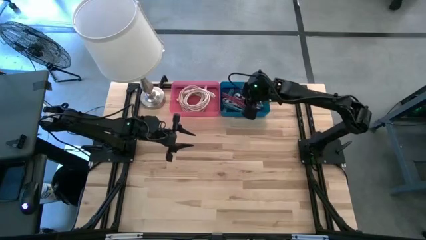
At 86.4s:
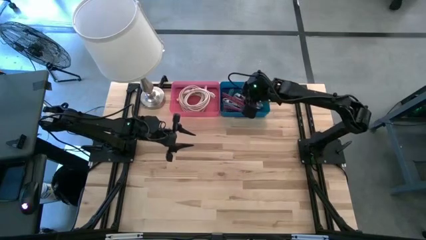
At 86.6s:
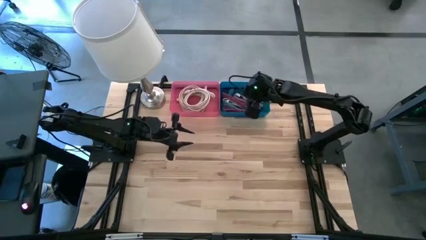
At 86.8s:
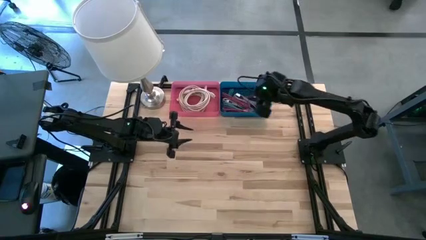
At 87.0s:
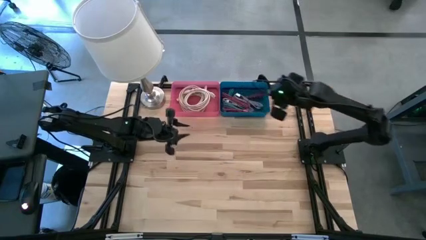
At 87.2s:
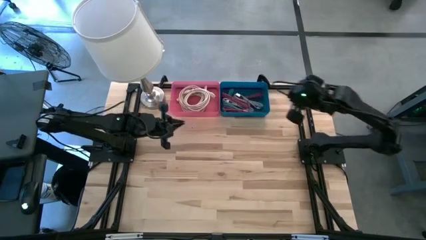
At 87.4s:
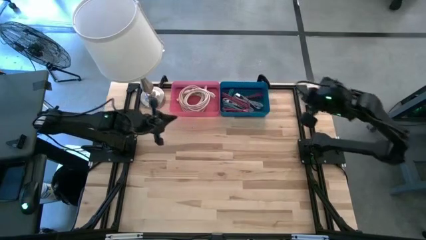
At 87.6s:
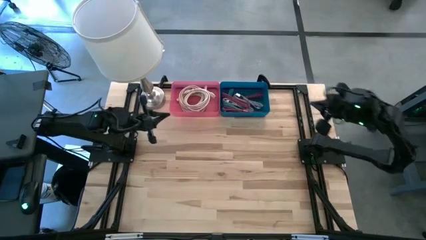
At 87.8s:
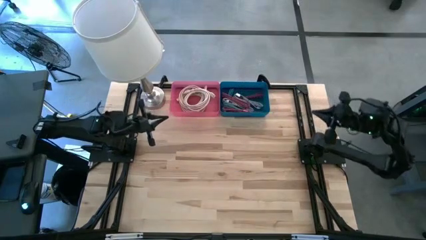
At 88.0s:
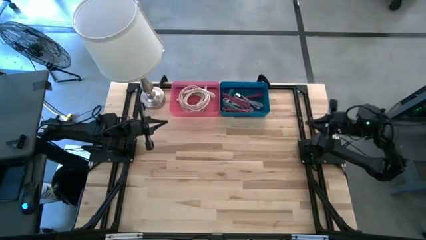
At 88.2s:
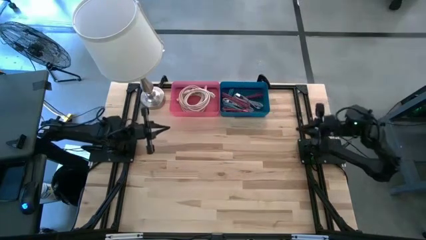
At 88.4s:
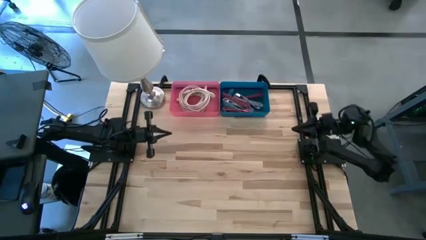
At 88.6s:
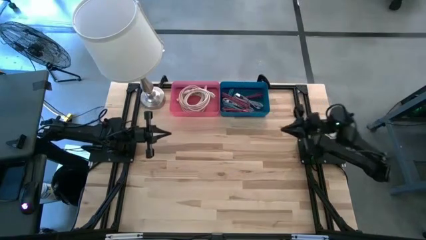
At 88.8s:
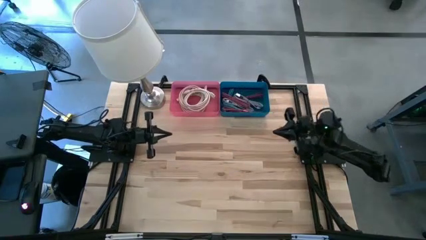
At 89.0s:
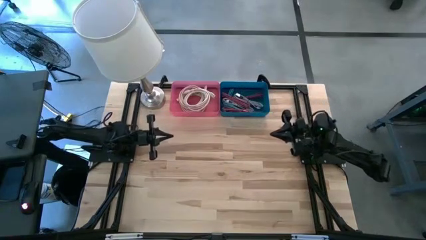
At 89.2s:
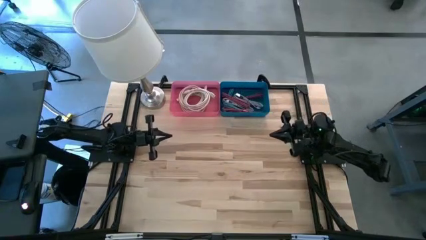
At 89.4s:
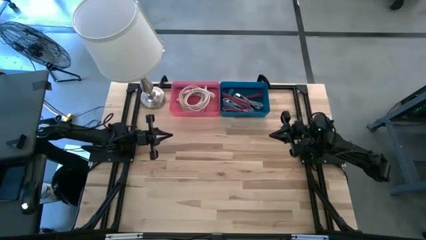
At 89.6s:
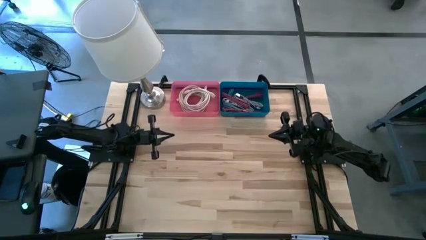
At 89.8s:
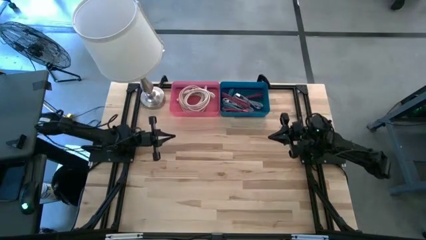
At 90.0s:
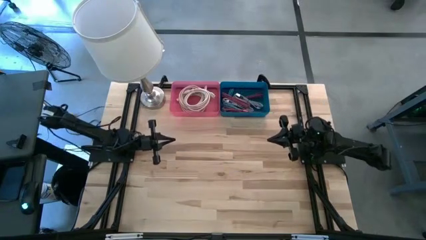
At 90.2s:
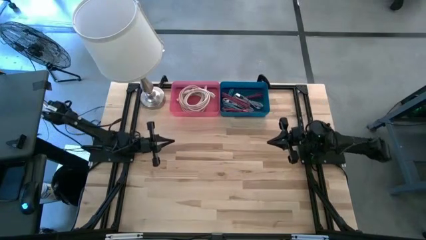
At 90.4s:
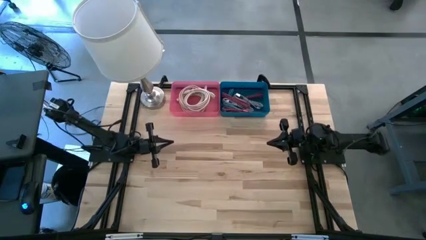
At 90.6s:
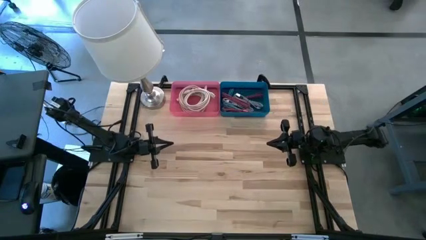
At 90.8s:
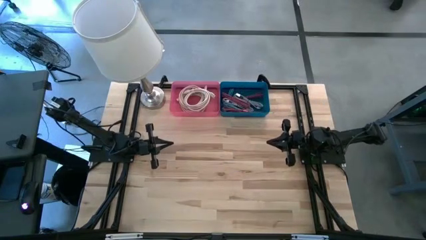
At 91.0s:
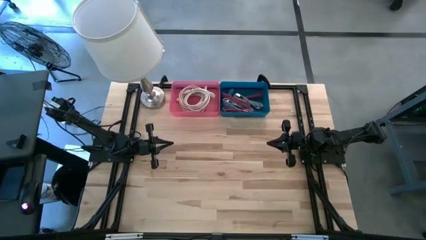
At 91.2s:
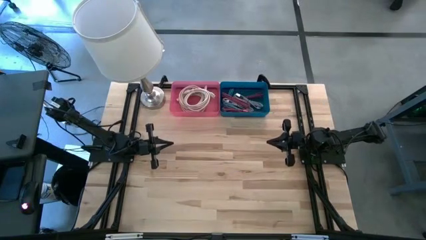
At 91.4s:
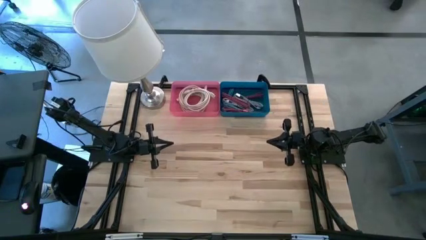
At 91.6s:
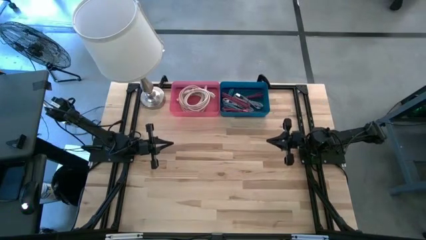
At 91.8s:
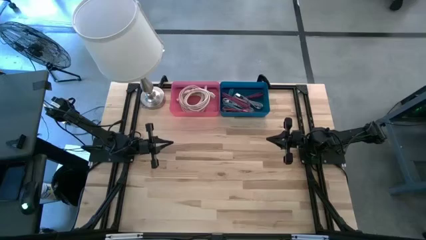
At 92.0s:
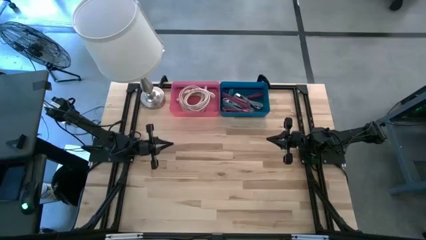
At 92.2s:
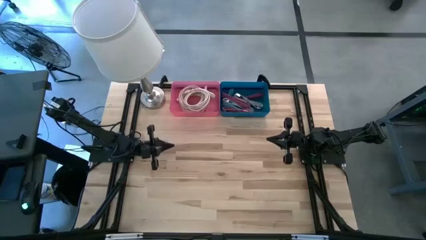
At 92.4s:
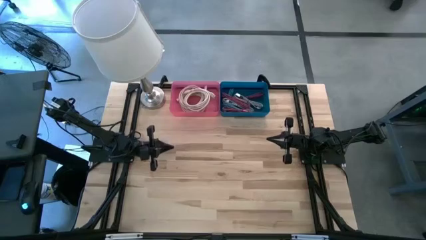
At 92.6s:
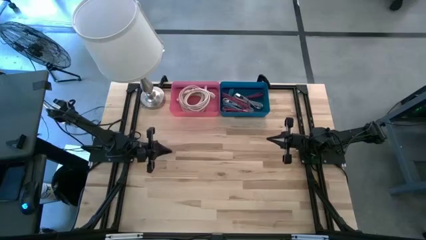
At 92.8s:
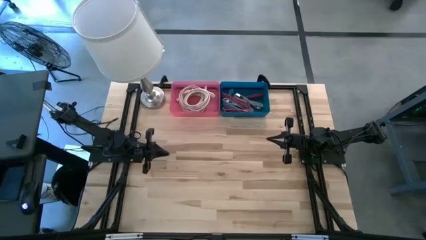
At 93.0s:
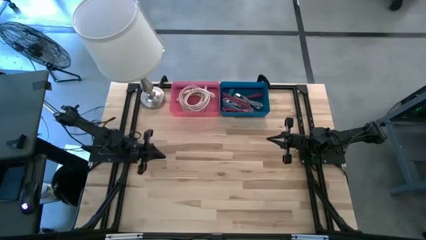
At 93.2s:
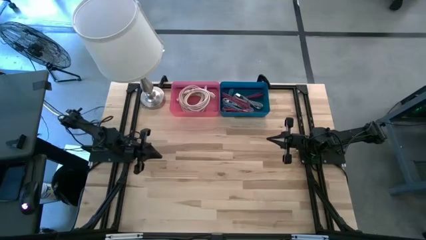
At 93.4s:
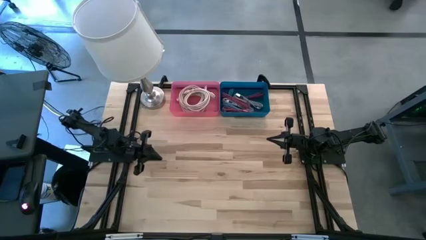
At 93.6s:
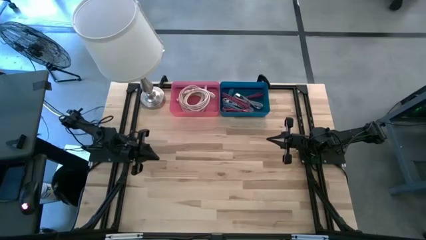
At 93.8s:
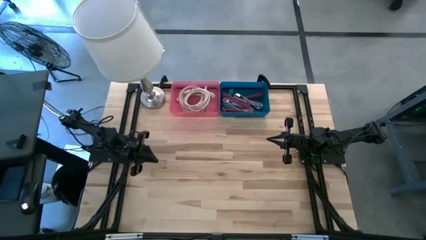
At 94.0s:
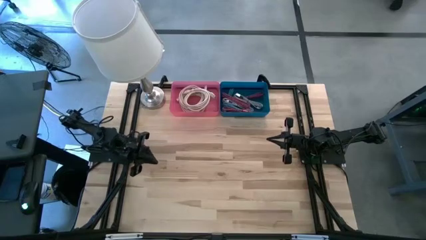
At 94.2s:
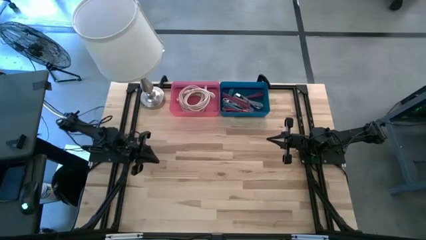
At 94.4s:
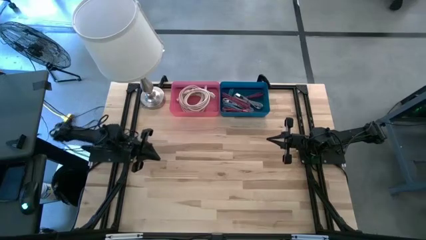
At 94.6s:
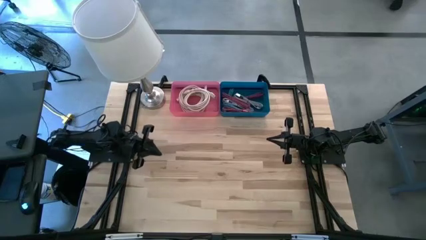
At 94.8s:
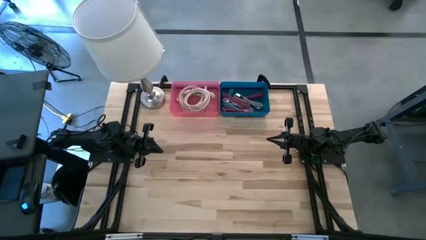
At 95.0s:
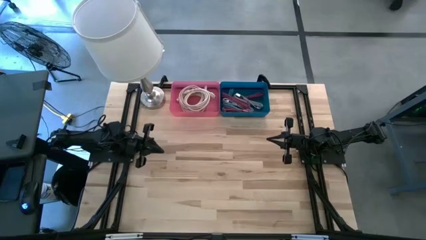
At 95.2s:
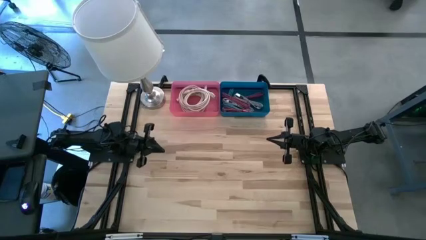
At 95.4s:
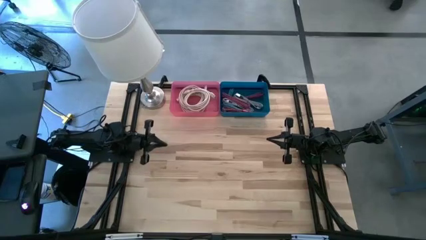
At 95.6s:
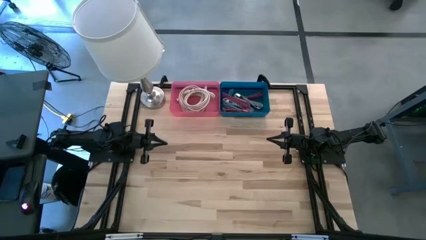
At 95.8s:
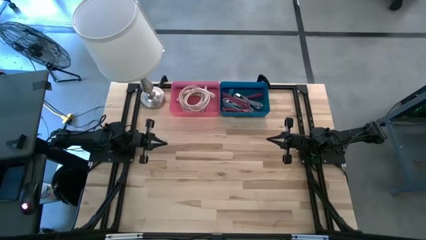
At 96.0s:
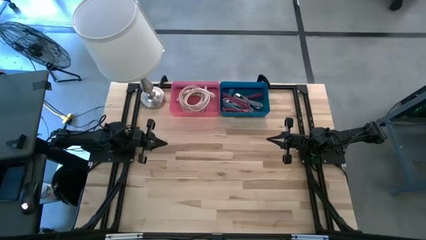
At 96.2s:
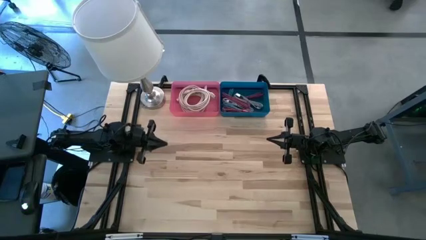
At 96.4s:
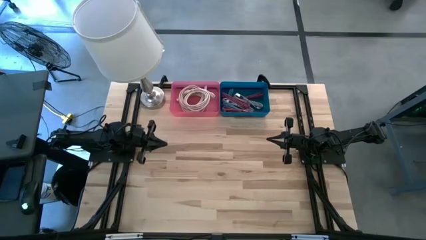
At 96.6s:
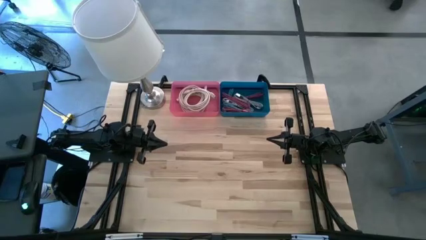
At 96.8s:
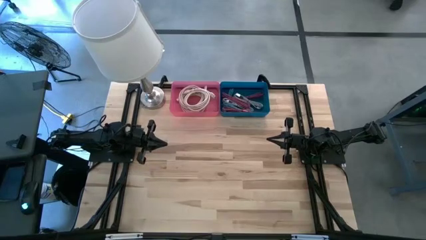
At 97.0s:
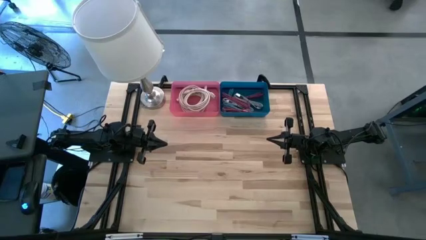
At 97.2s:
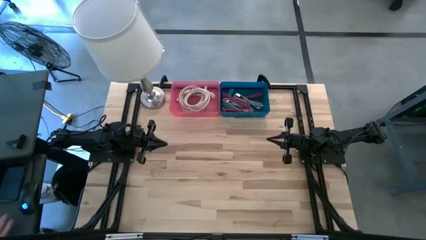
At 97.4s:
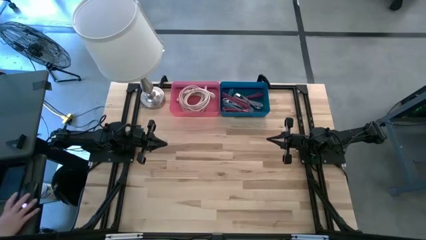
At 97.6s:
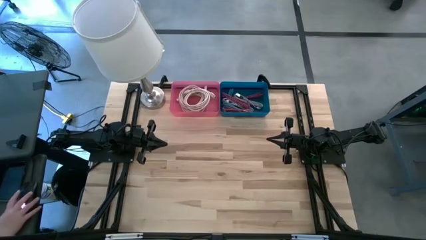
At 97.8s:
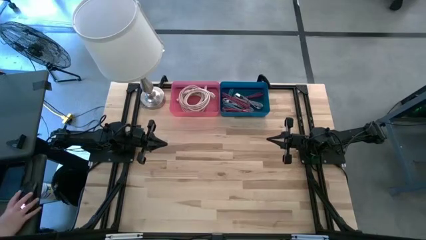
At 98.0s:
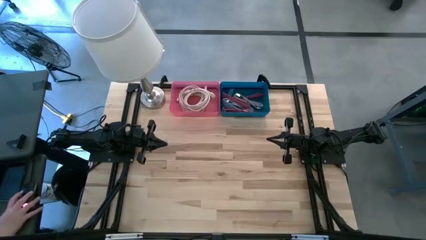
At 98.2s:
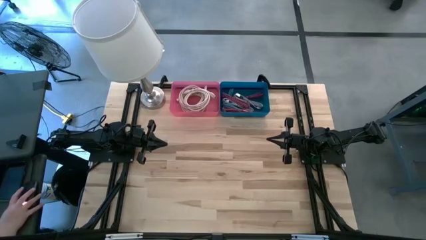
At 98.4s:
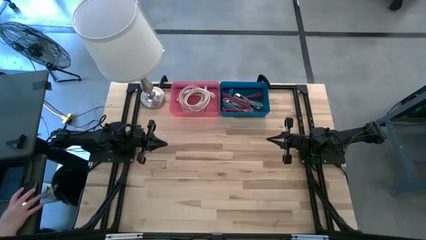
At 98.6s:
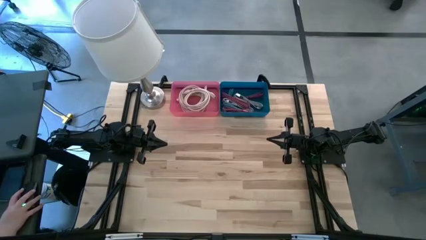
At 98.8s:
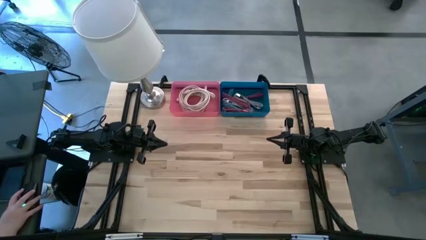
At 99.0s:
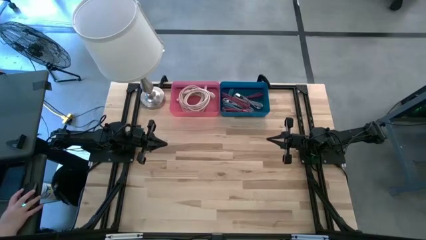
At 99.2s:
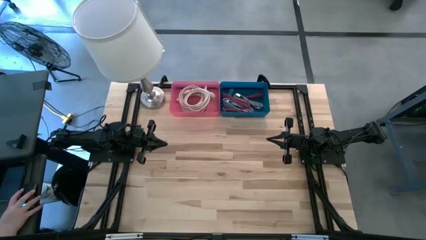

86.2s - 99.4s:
Task: Pick & Place USB Port
Return to Home Position
